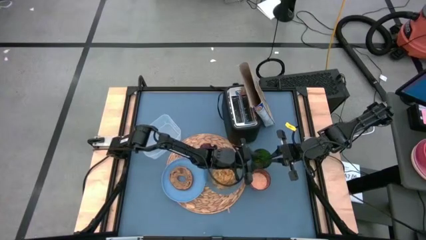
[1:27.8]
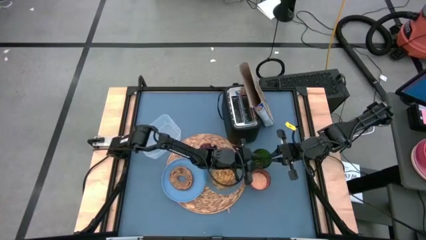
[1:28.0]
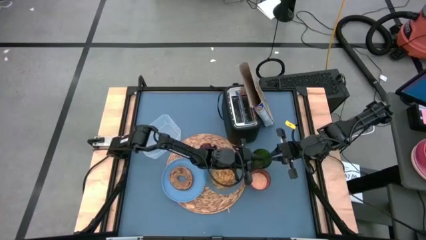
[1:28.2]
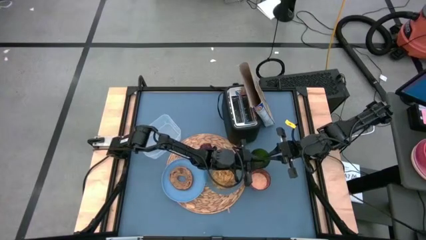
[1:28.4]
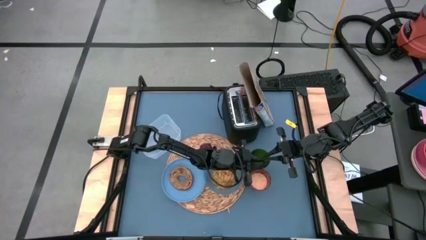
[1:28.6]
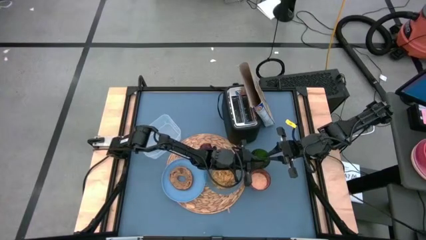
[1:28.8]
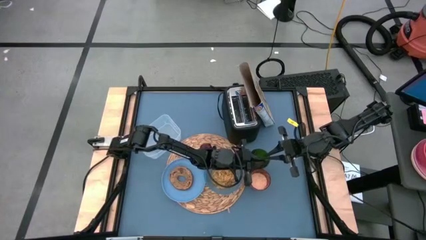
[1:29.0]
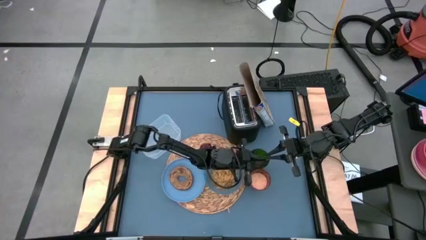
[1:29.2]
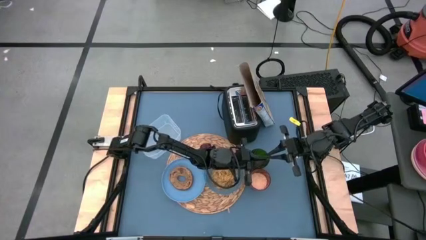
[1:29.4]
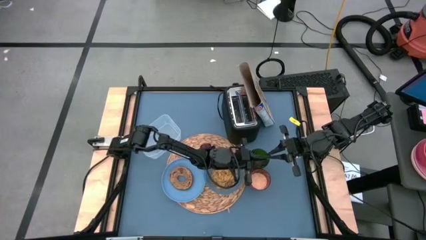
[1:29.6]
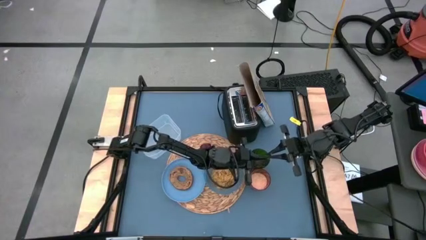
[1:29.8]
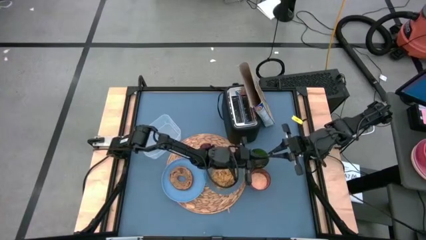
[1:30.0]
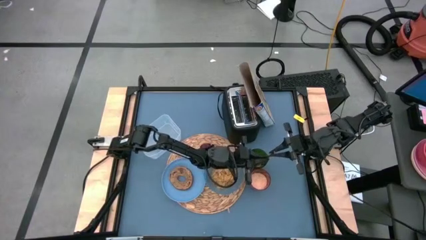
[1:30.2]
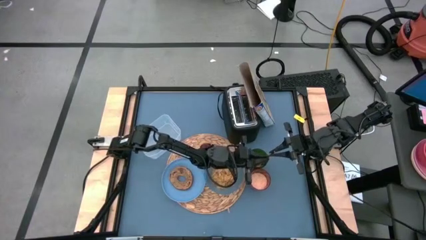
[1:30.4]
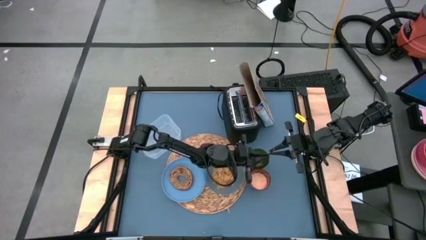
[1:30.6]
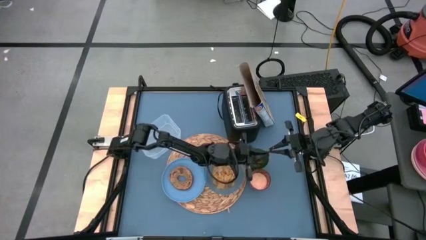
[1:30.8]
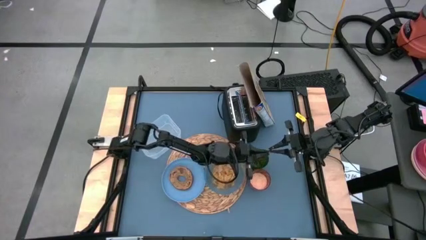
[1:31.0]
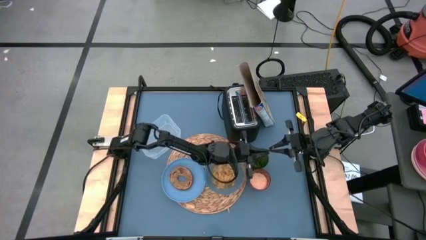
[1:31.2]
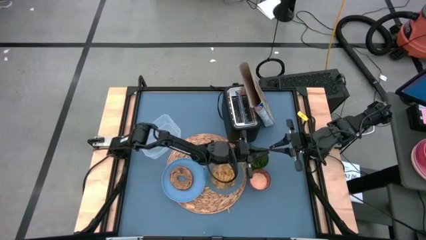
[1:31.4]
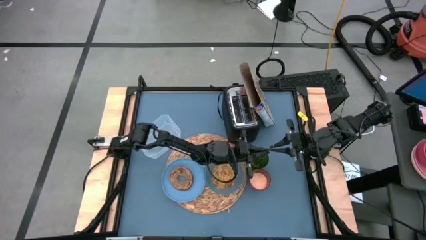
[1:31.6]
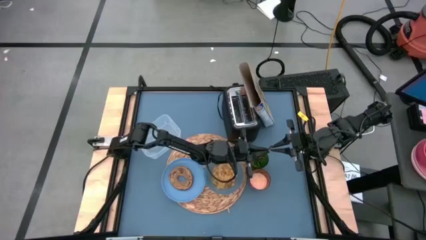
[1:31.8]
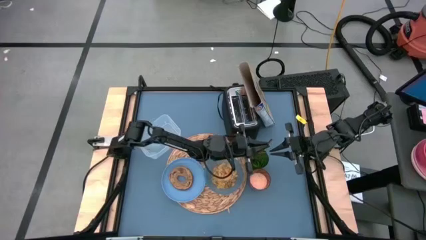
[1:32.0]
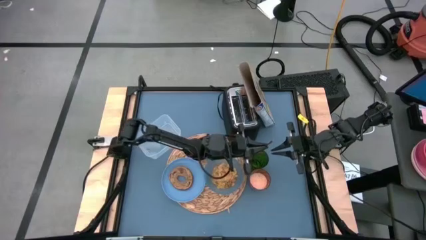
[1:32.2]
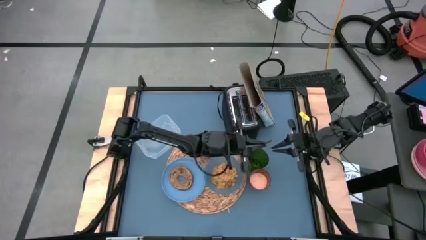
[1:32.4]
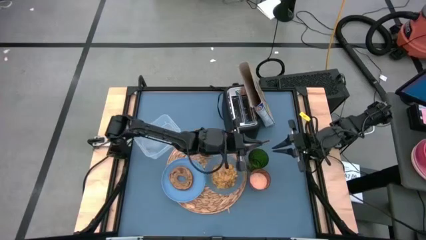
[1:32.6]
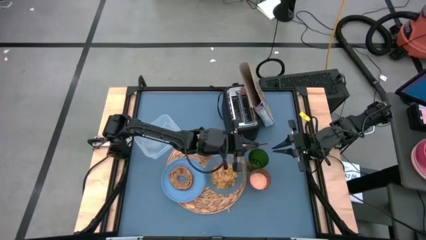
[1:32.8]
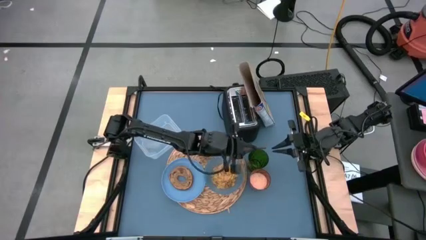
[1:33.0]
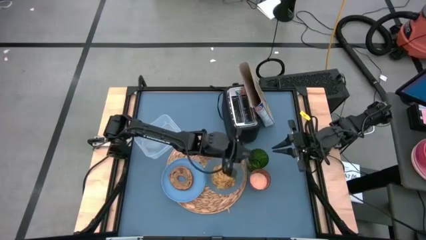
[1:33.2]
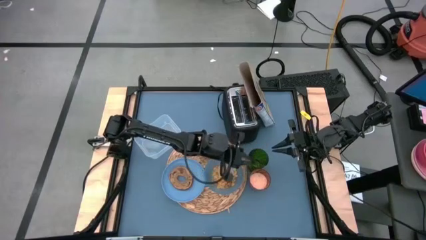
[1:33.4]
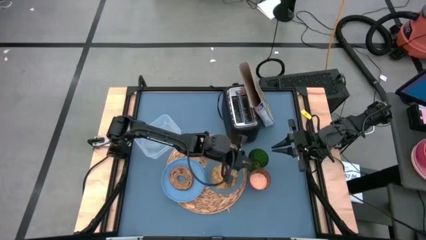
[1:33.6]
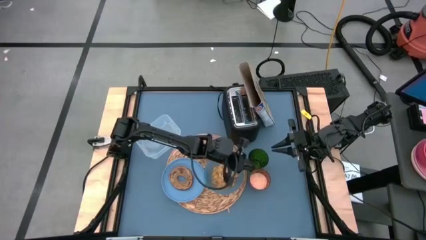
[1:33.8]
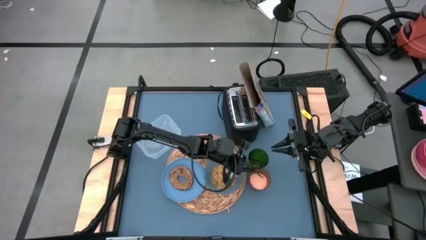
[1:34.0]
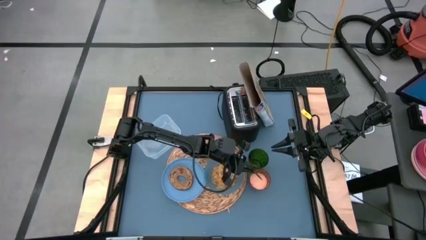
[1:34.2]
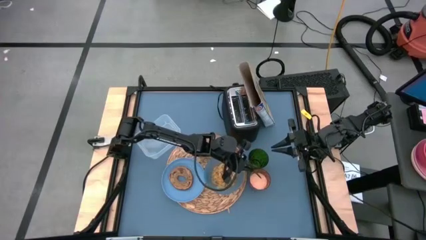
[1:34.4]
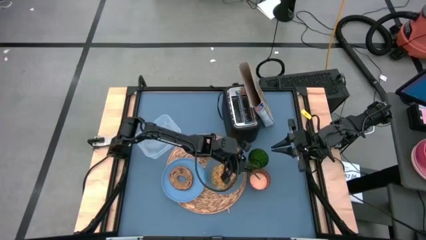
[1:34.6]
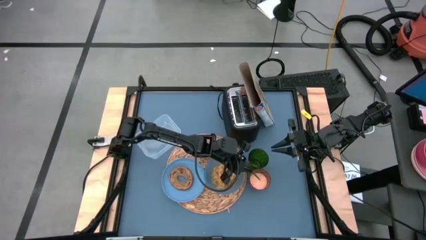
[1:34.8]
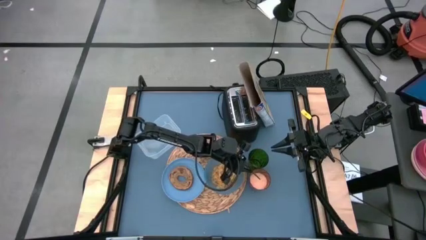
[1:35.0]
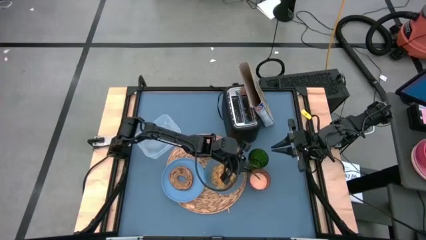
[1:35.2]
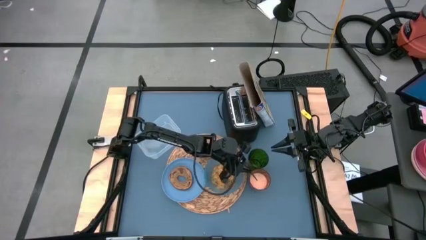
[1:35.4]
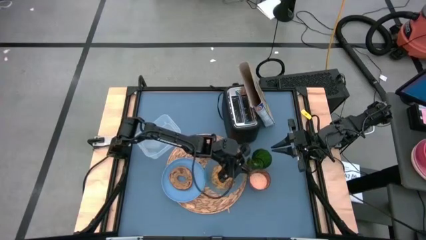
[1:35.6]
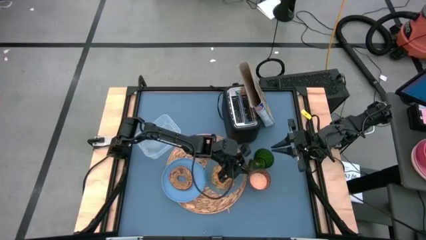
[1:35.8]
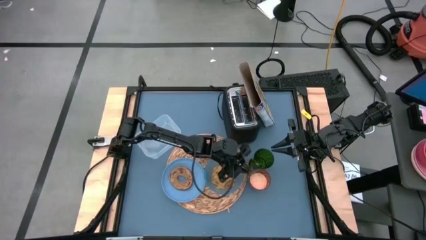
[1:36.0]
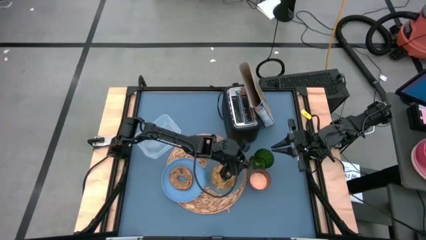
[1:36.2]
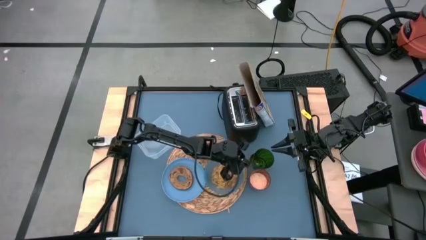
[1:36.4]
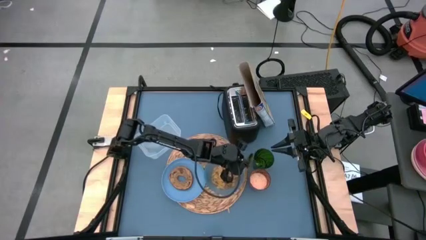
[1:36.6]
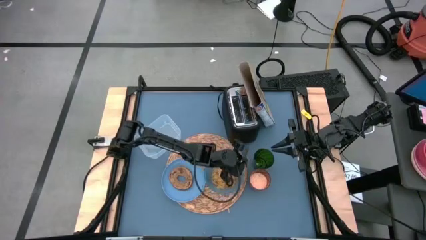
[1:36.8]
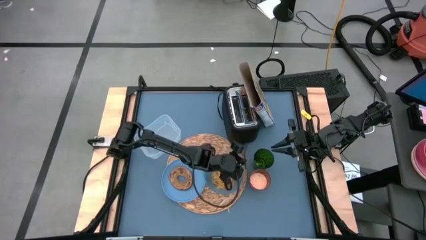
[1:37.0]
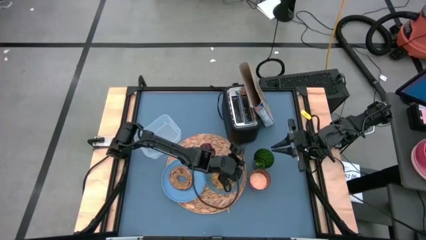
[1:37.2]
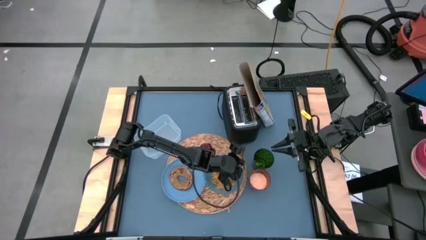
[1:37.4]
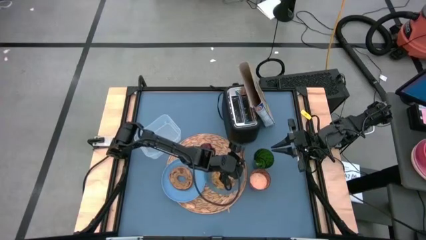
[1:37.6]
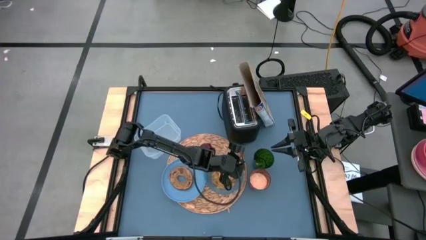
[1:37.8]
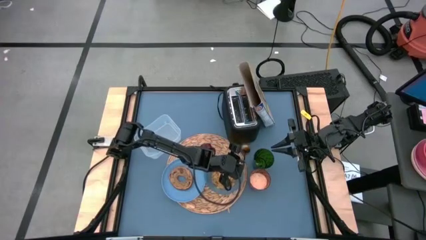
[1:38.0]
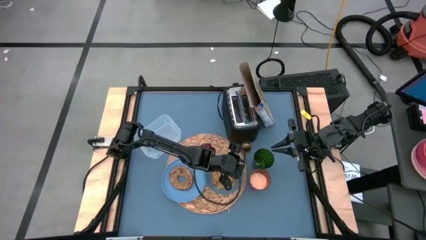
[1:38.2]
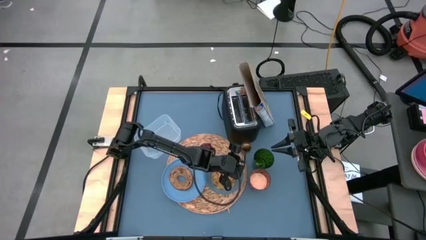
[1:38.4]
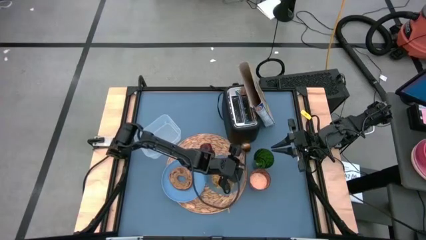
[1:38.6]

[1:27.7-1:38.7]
Task: Arrange a breakfast setting
Put the gold spoon on the right side of the blue bowl
